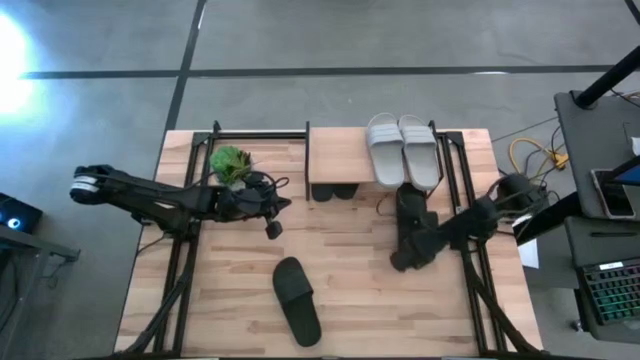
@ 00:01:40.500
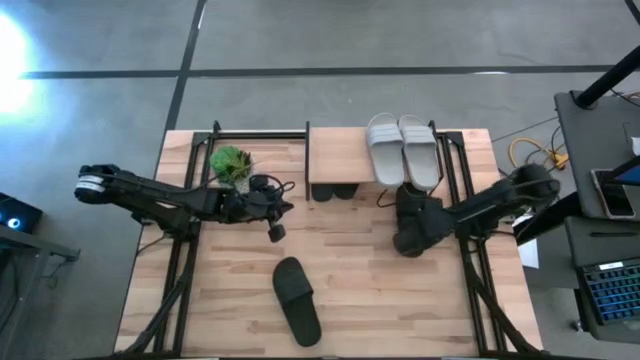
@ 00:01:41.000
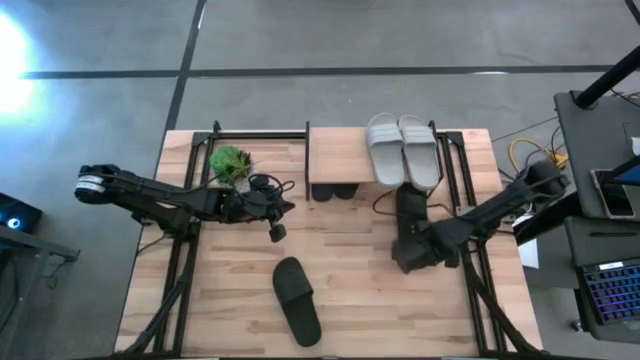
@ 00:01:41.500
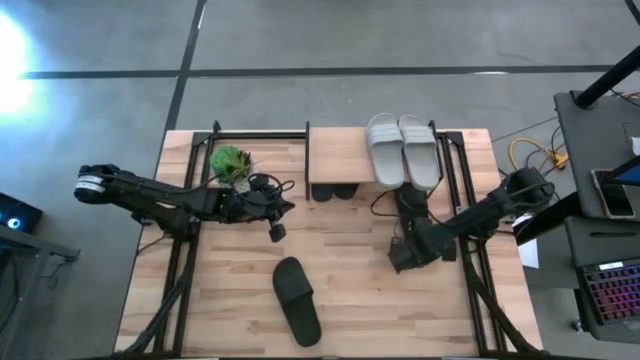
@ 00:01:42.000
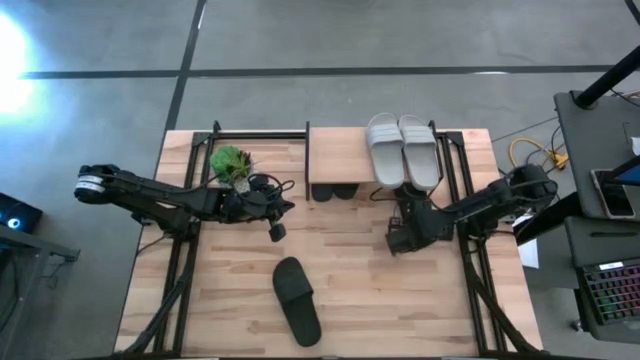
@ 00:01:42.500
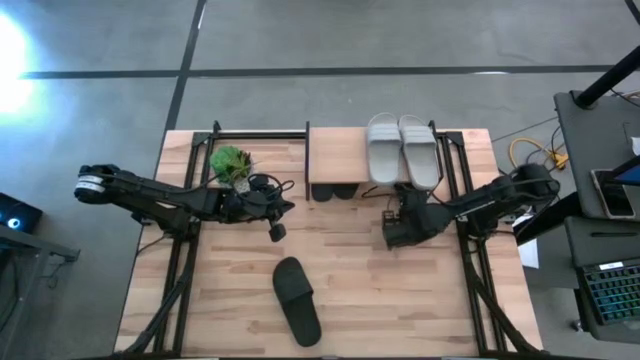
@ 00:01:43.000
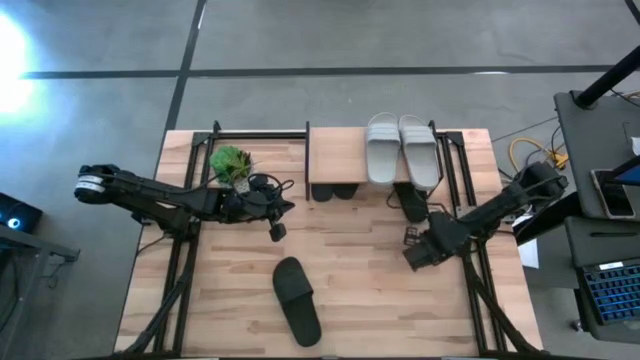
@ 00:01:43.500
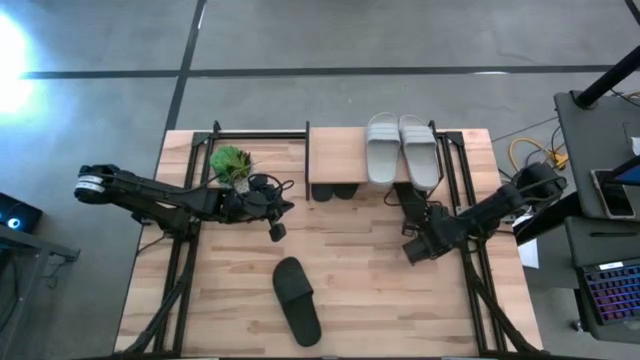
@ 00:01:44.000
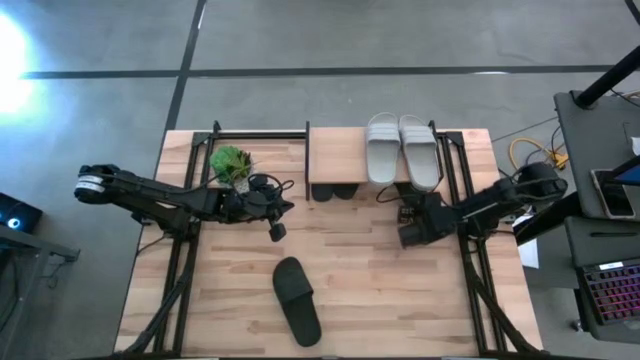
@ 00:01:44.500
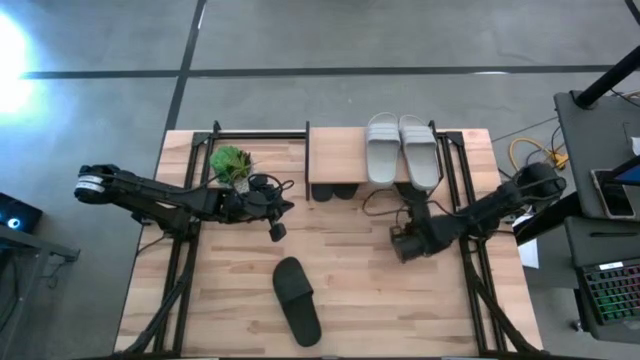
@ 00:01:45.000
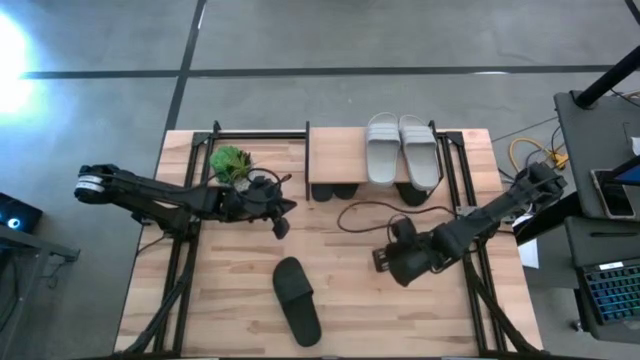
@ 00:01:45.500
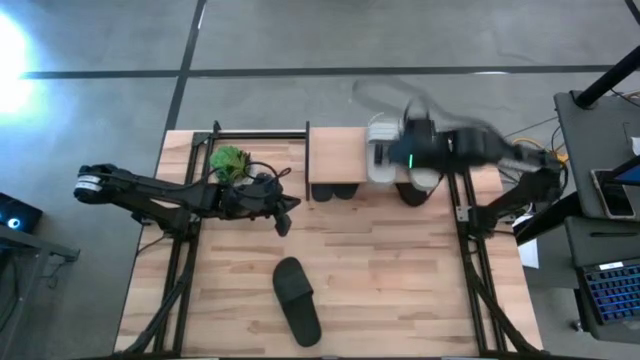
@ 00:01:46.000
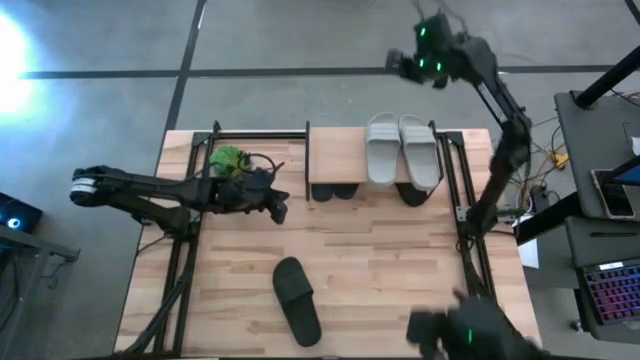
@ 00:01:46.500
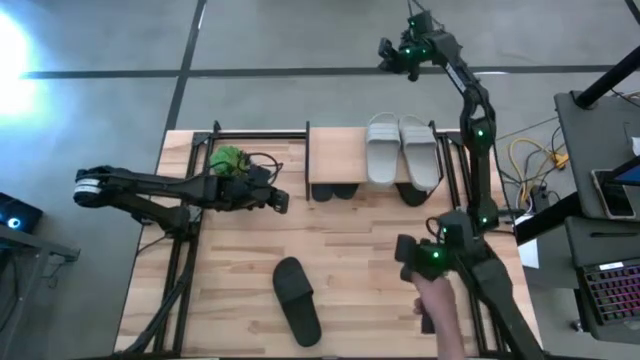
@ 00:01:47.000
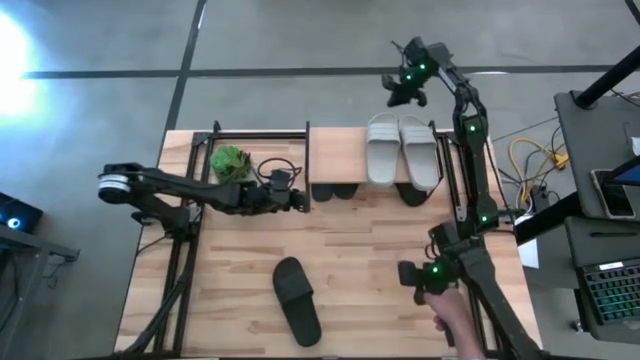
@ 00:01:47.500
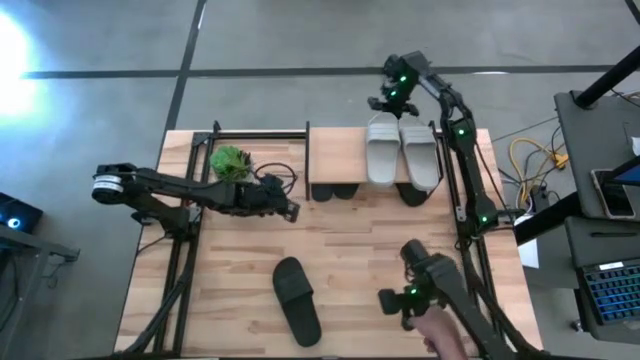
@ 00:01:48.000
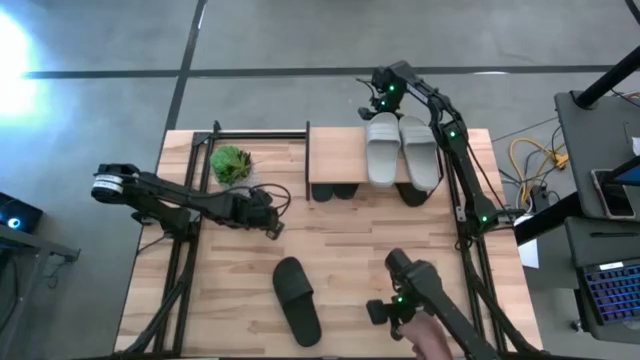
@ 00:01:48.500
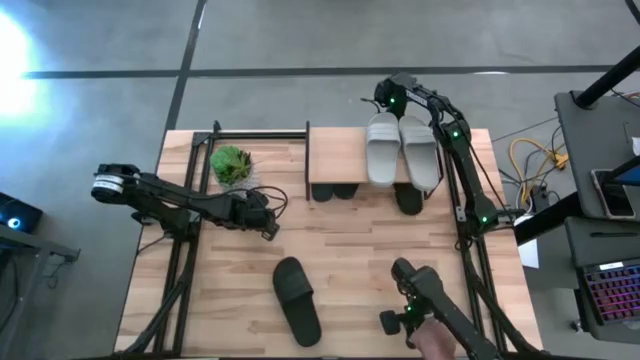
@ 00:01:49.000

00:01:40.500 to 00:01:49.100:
Task: Pick and place slides into the shelf
Put the black slipper under the shelf

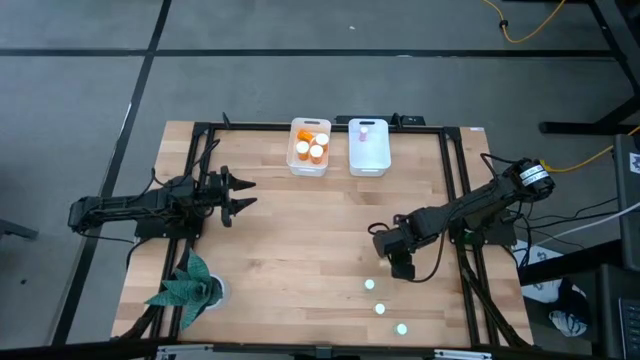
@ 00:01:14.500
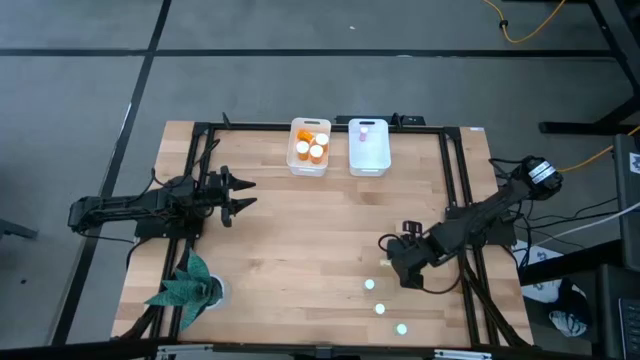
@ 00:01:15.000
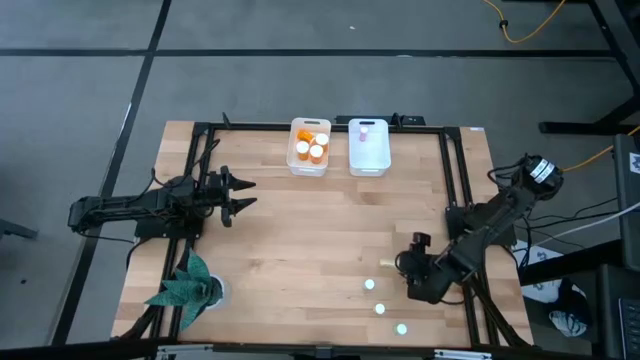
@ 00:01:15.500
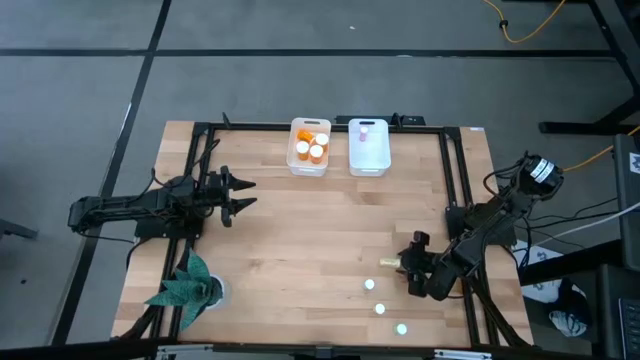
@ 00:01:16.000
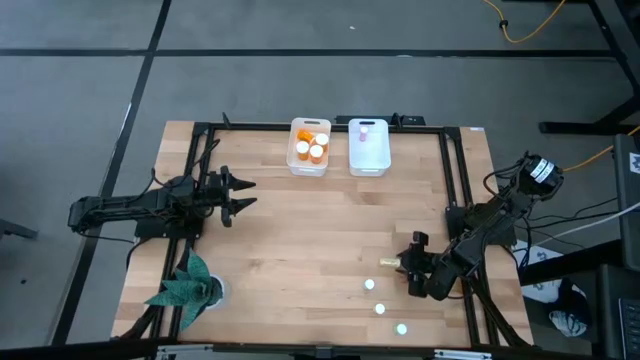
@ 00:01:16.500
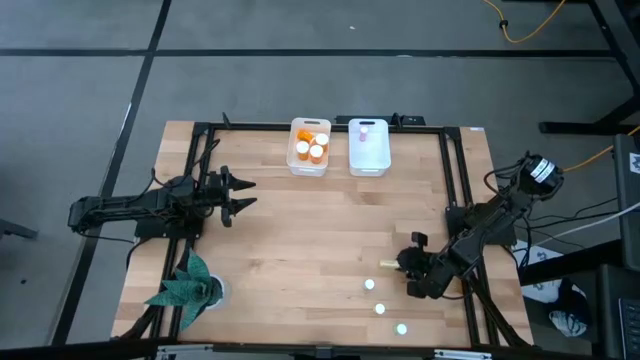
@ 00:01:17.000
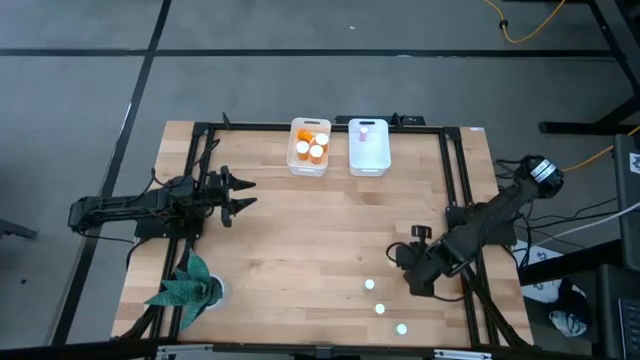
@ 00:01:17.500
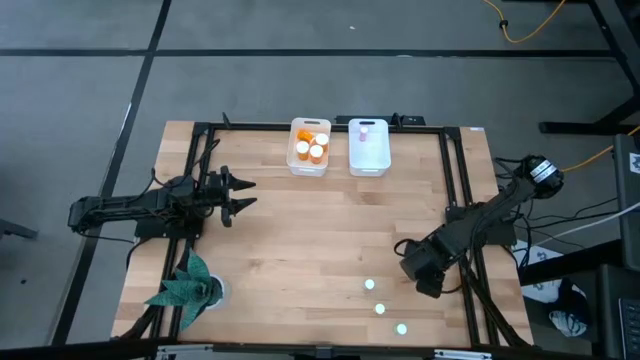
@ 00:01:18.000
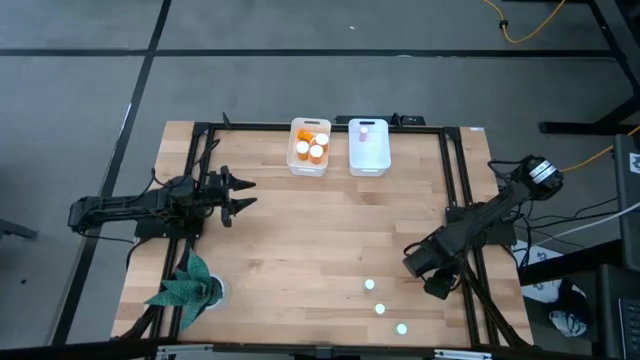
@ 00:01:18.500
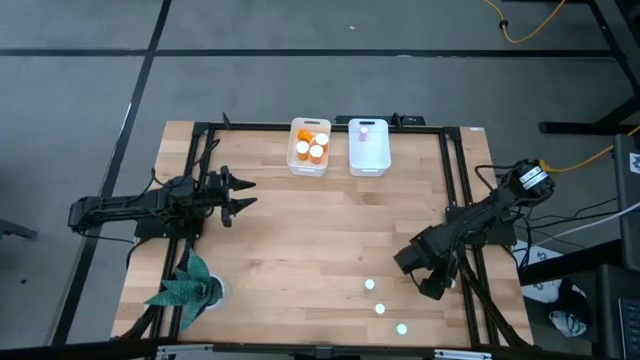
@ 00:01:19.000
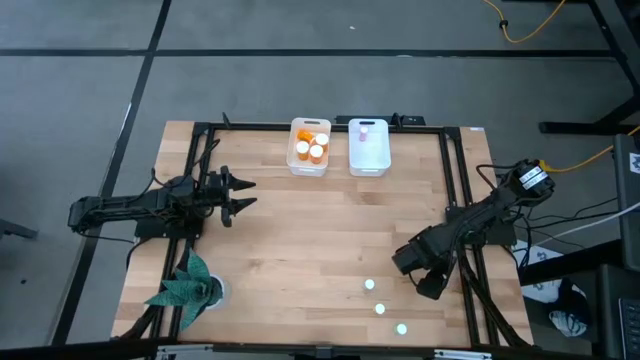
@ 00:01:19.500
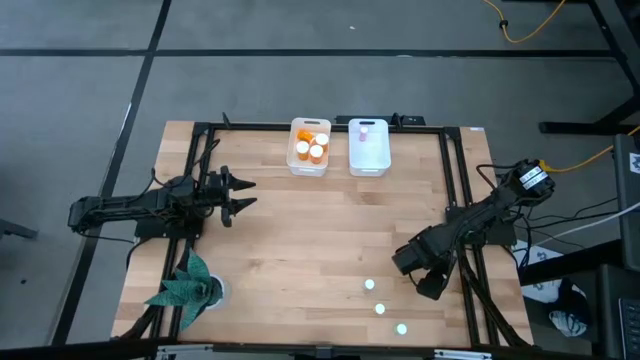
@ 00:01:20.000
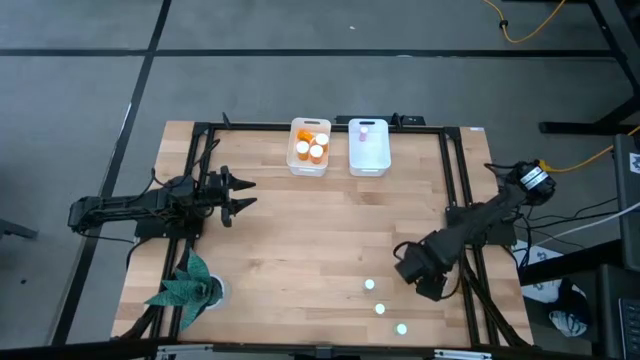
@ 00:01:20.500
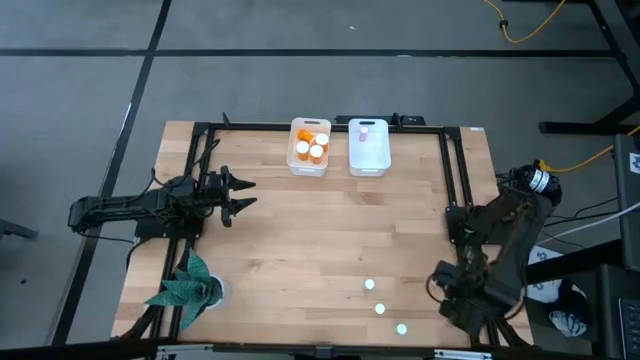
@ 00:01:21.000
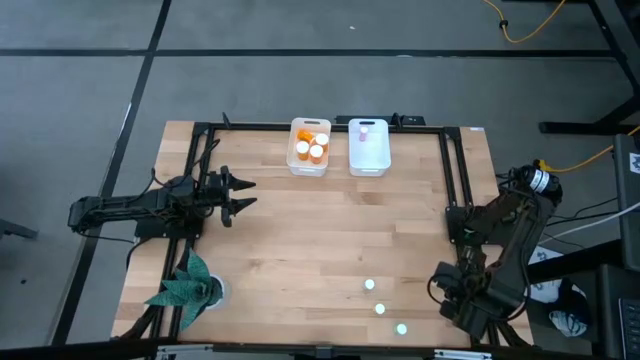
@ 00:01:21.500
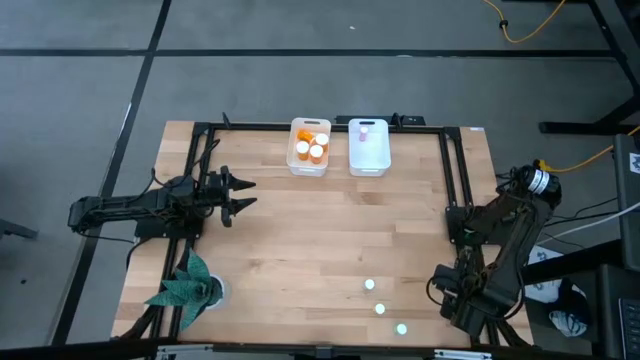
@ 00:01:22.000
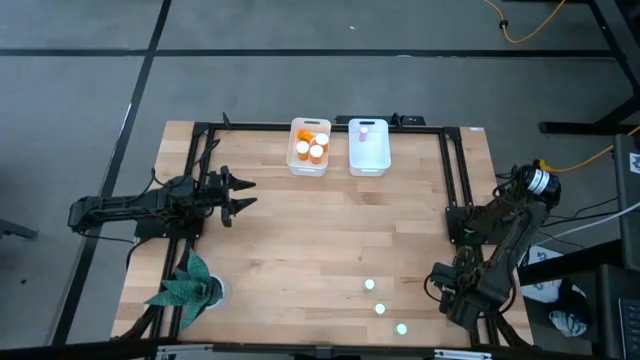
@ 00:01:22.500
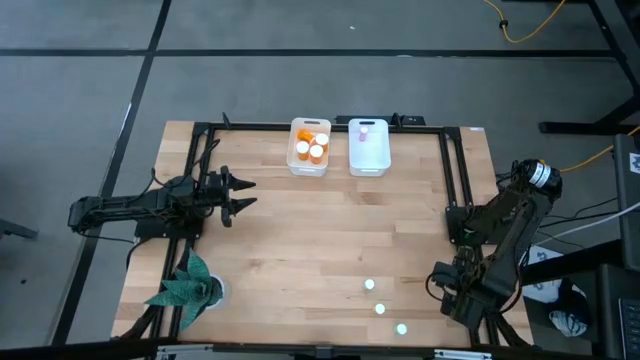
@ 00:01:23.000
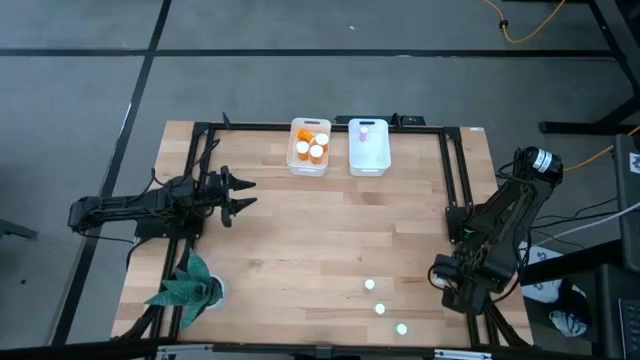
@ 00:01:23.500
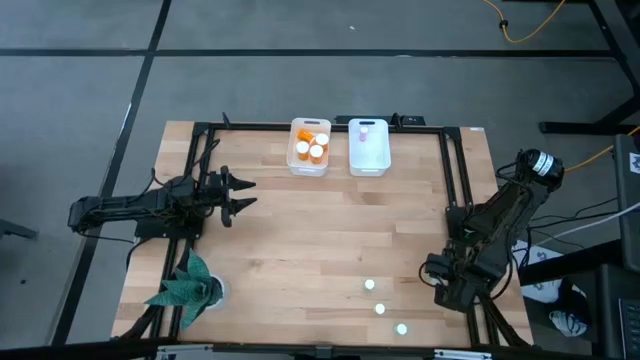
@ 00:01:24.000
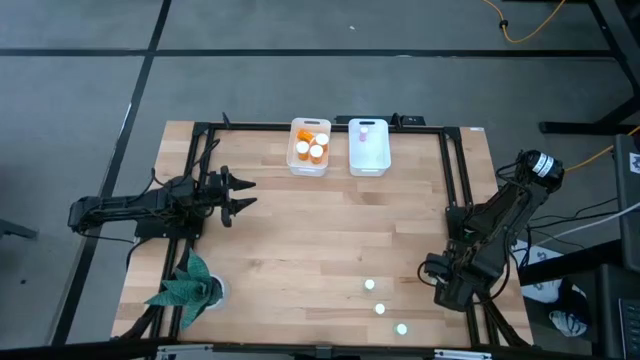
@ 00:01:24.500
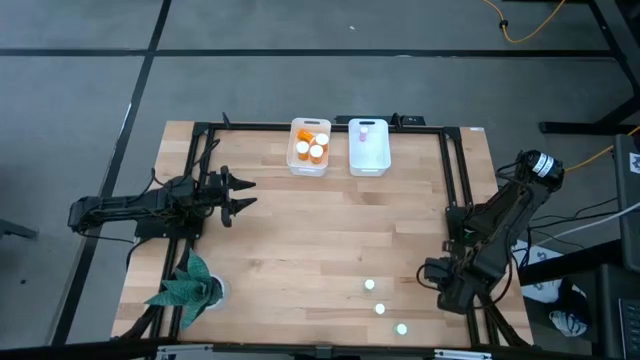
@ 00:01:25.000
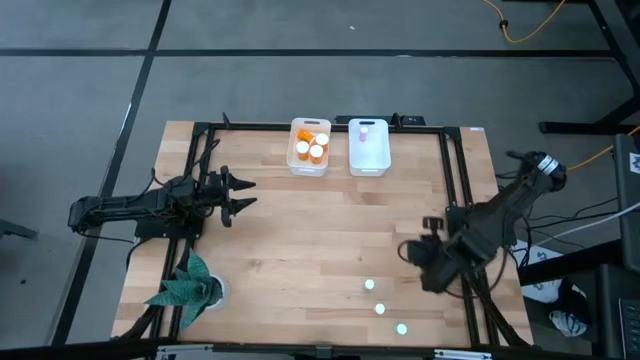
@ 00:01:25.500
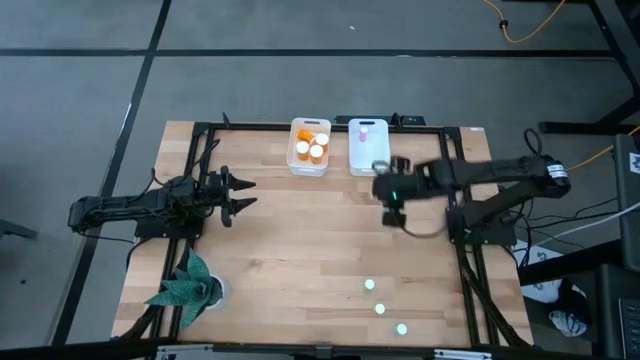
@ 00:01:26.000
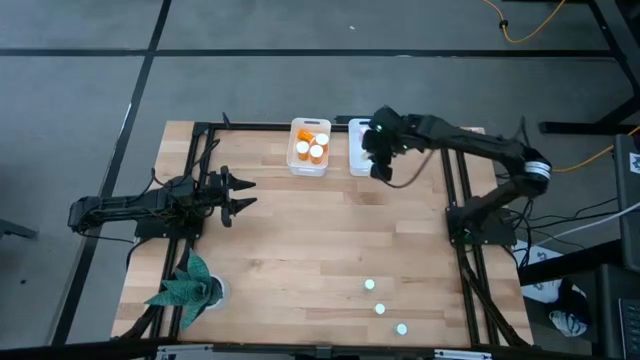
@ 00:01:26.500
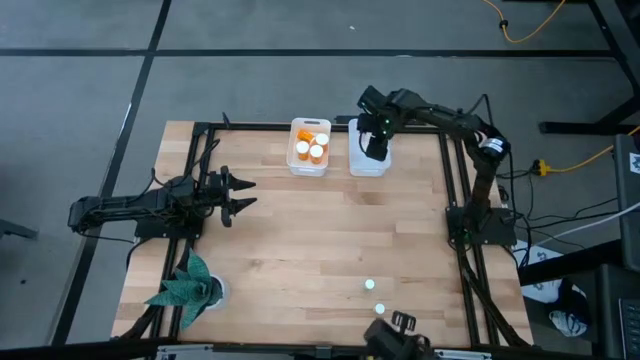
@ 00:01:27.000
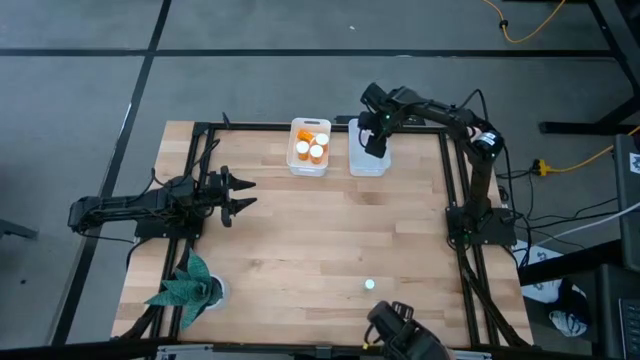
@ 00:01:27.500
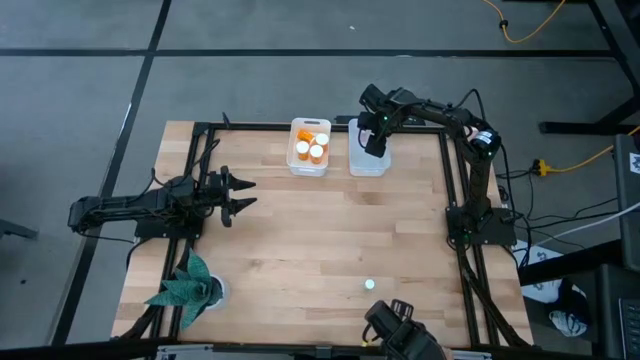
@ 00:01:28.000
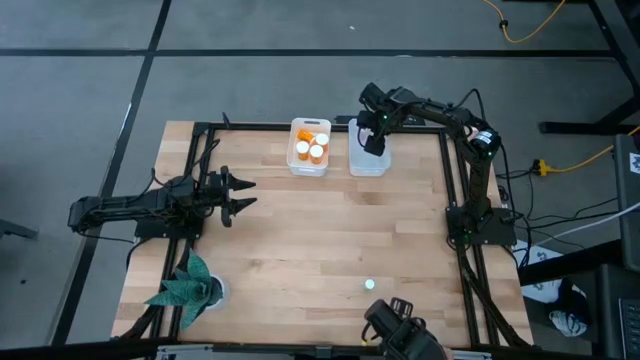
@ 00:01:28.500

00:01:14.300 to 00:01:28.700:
Task: Pick and place medicine bottles into bin by pill shape (circle, oval)
Put the yellow tablet bottle into the right white bin
